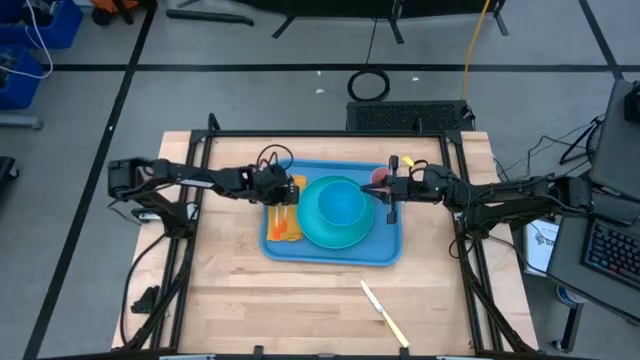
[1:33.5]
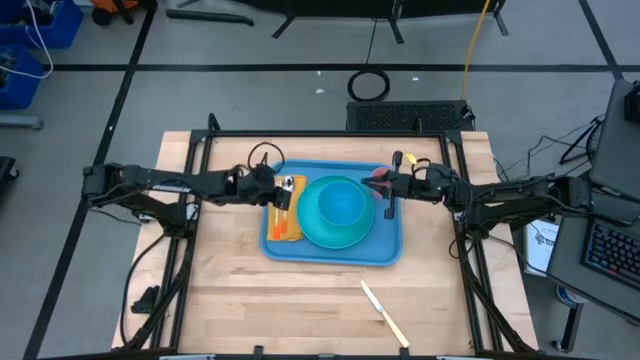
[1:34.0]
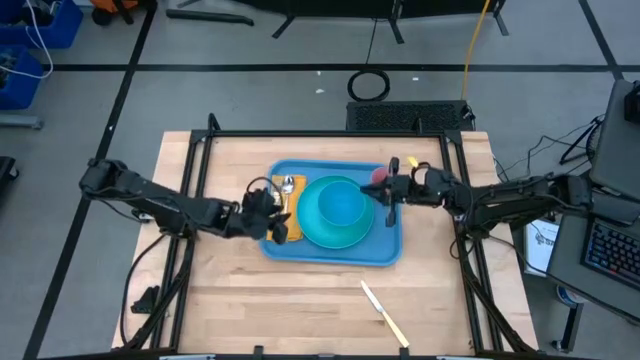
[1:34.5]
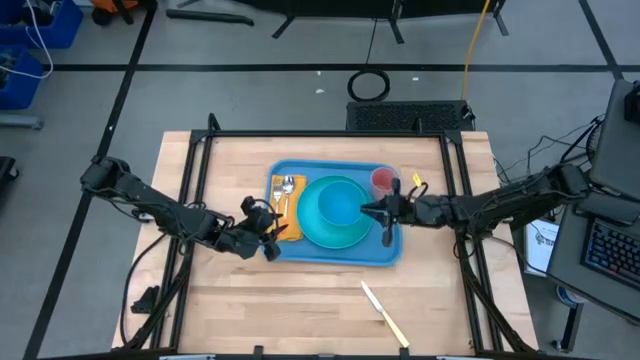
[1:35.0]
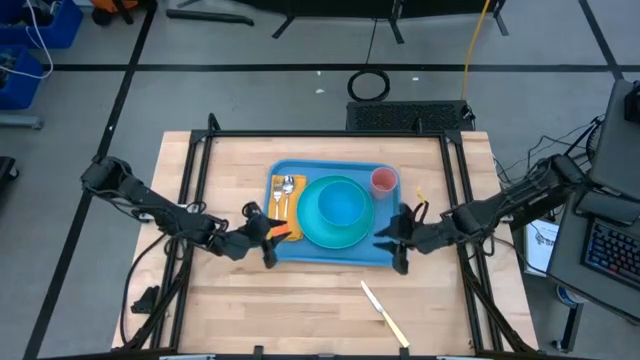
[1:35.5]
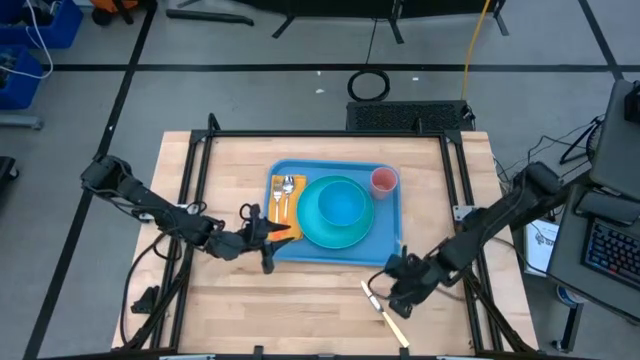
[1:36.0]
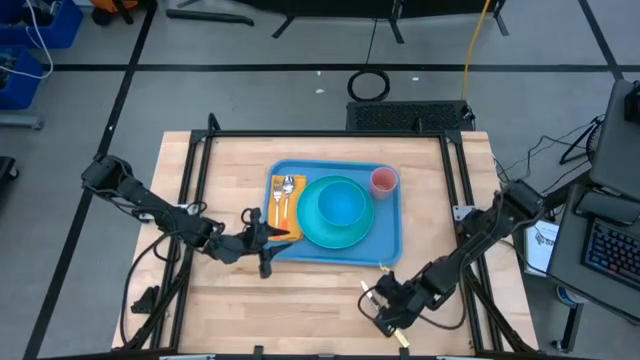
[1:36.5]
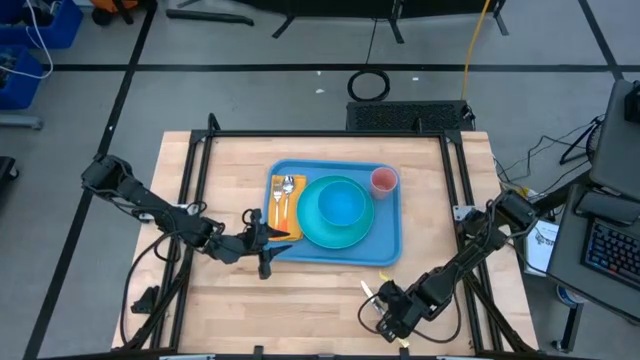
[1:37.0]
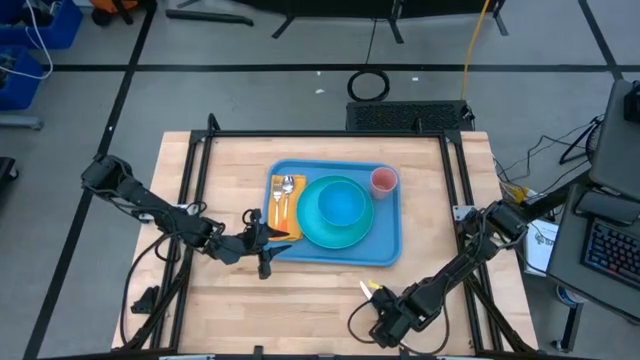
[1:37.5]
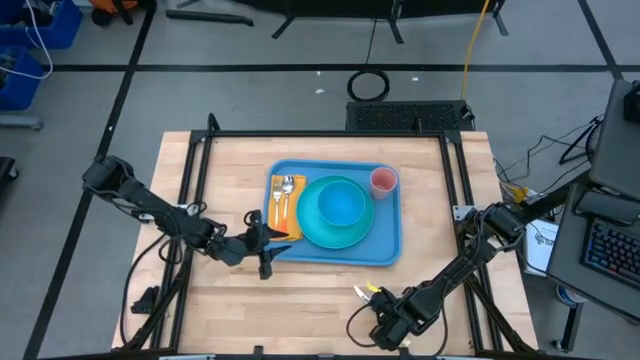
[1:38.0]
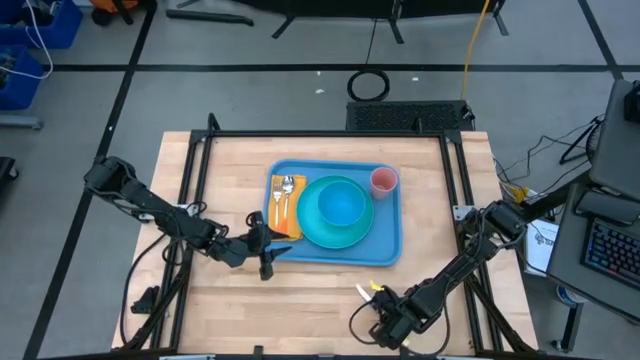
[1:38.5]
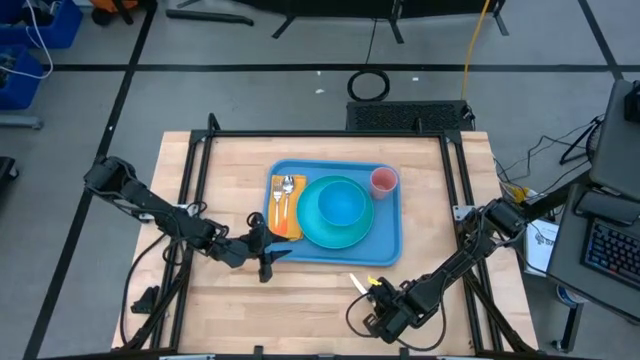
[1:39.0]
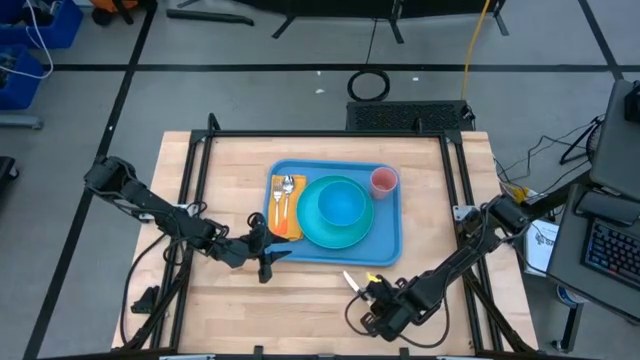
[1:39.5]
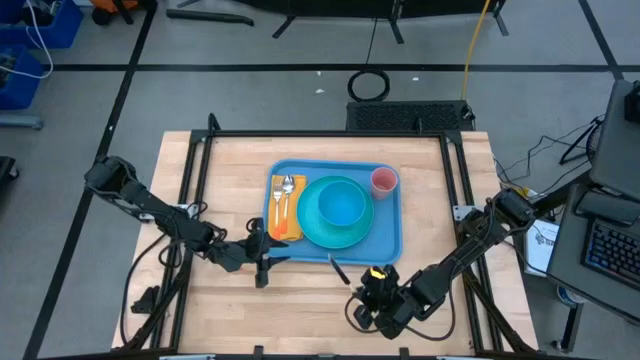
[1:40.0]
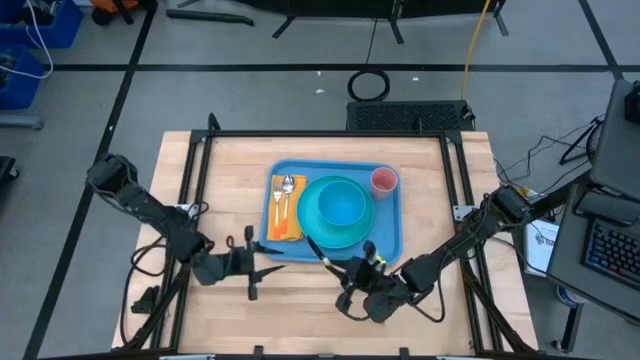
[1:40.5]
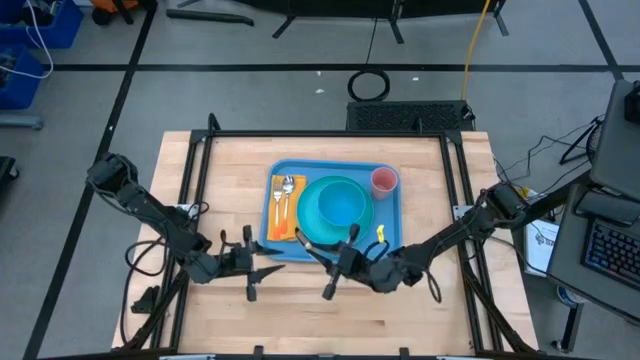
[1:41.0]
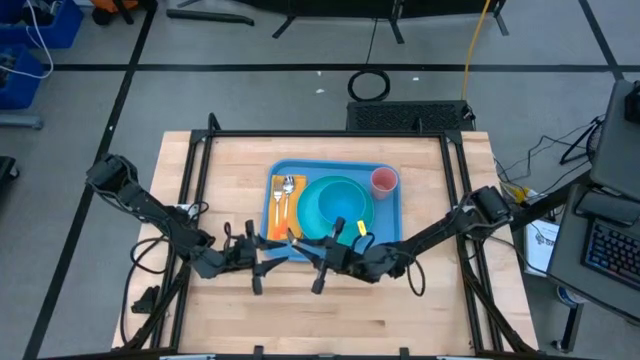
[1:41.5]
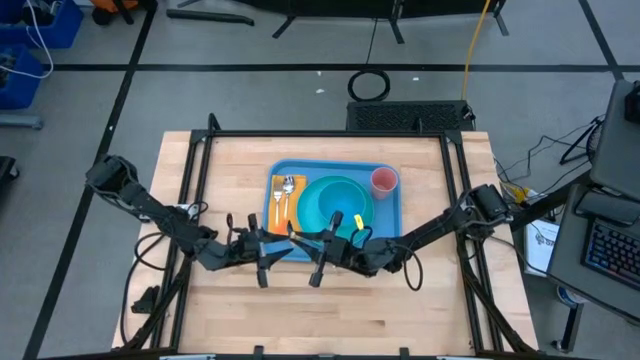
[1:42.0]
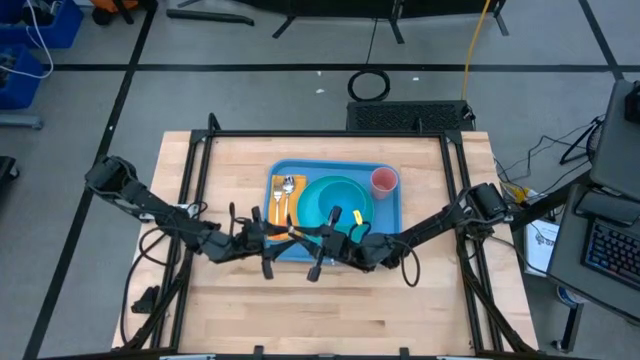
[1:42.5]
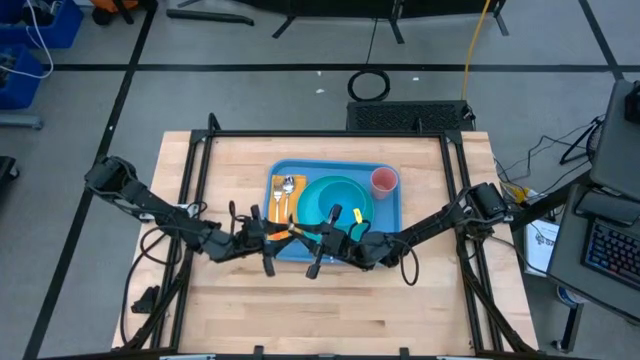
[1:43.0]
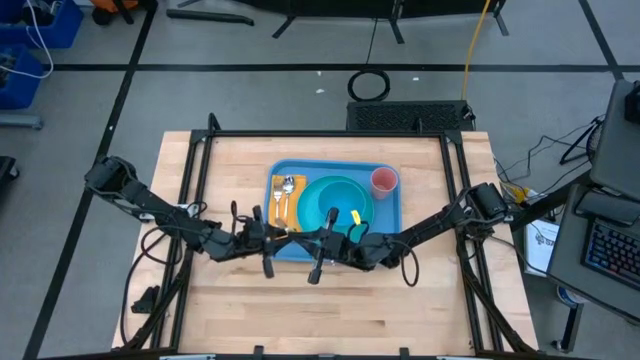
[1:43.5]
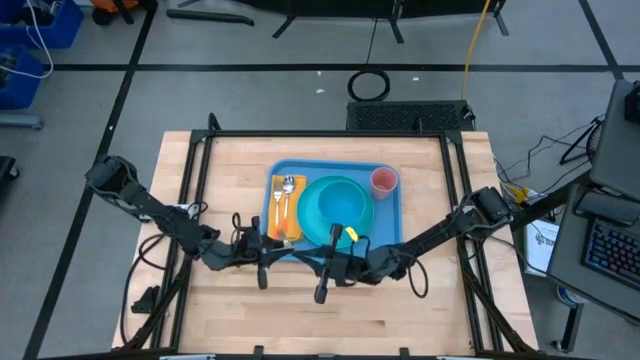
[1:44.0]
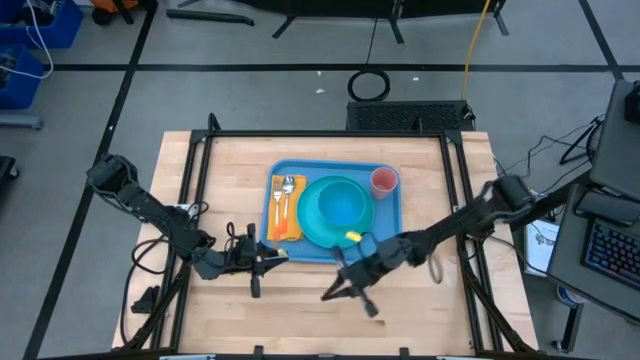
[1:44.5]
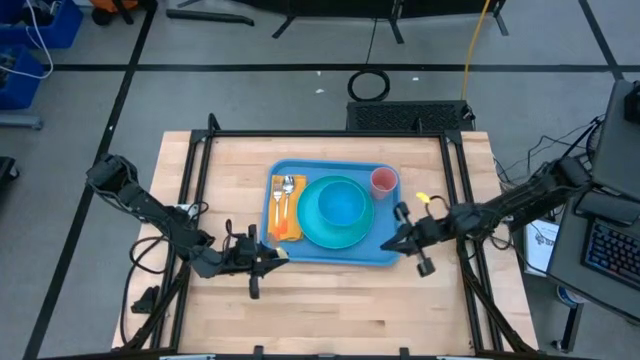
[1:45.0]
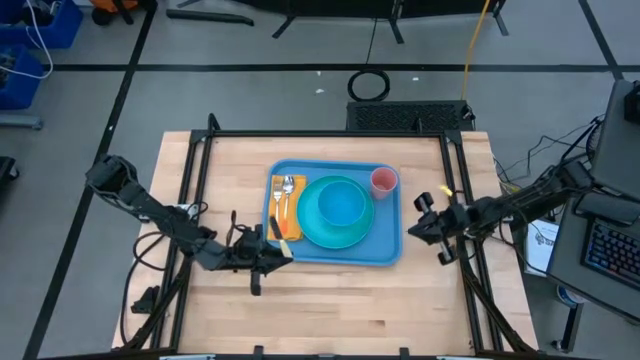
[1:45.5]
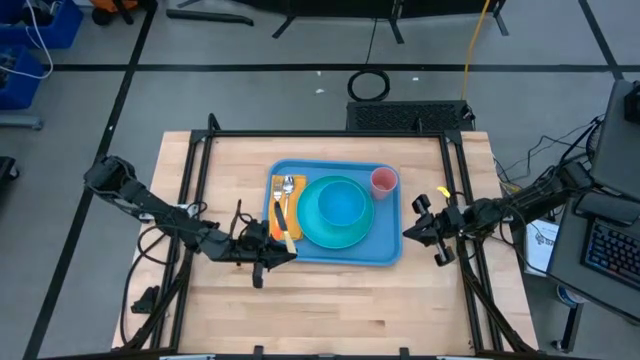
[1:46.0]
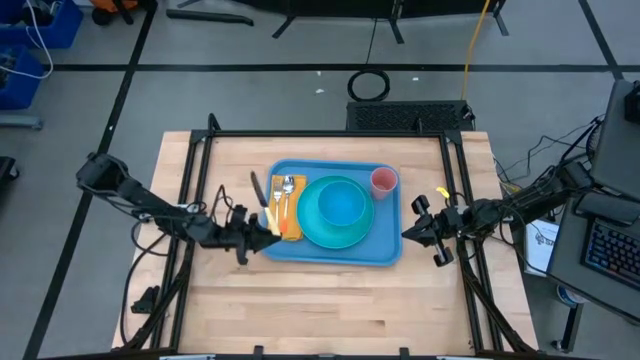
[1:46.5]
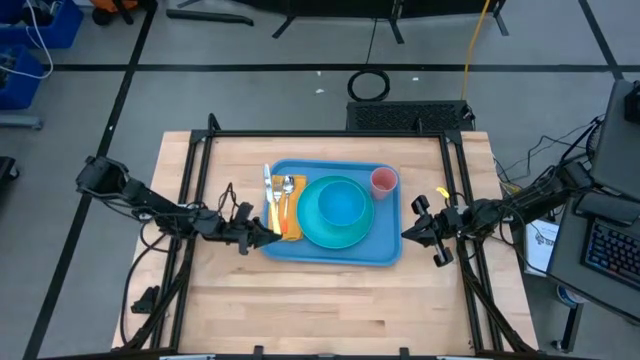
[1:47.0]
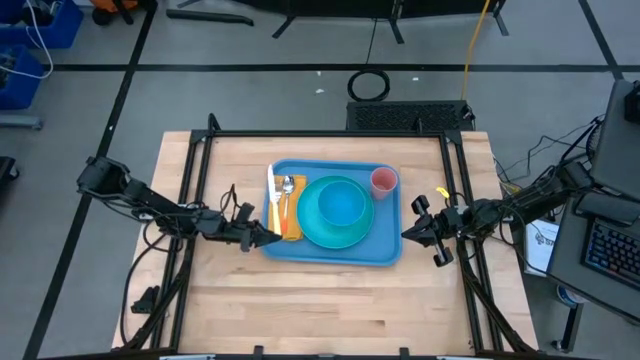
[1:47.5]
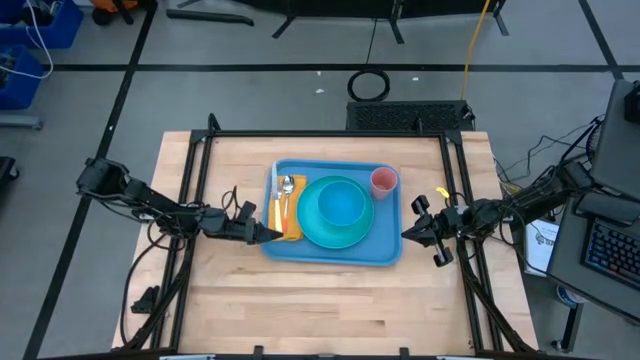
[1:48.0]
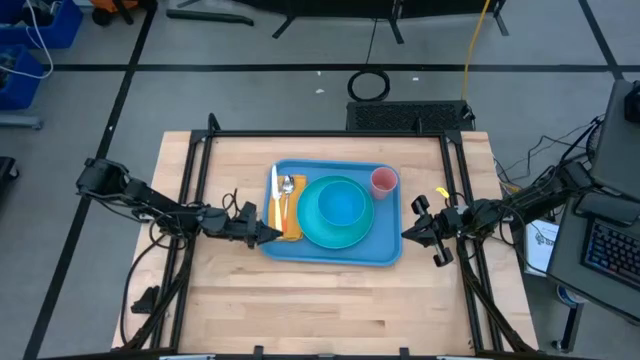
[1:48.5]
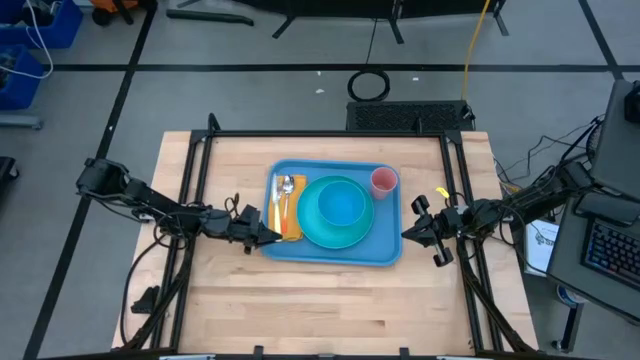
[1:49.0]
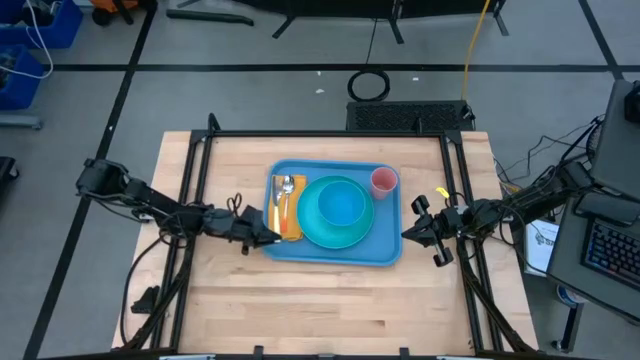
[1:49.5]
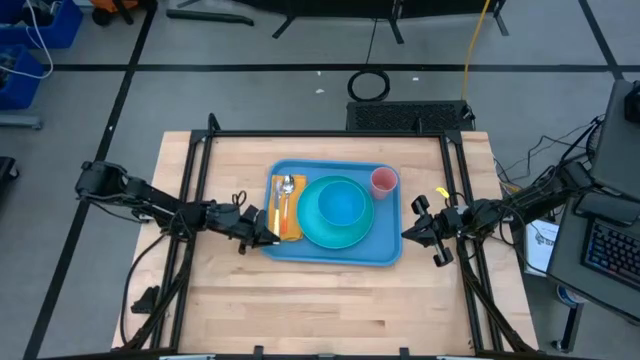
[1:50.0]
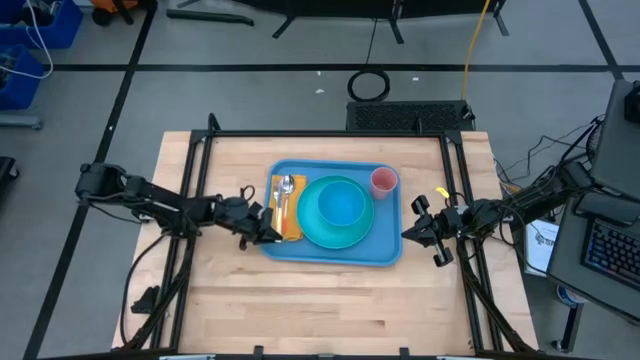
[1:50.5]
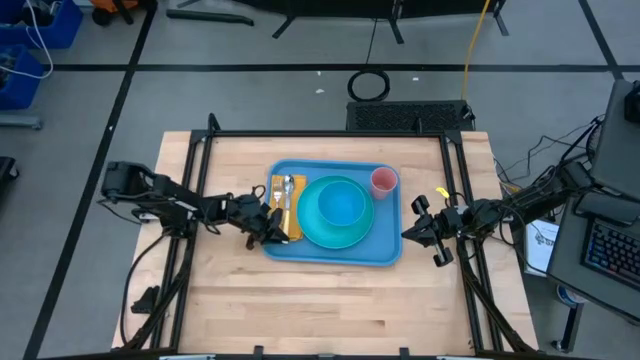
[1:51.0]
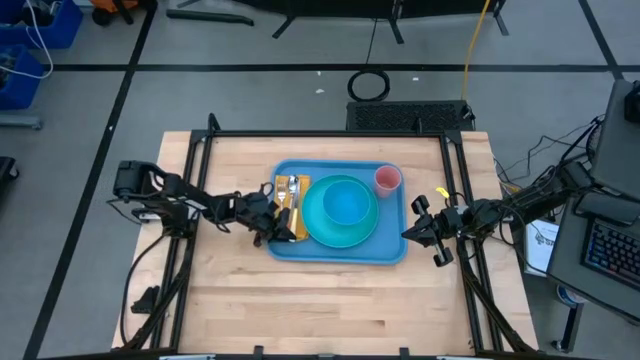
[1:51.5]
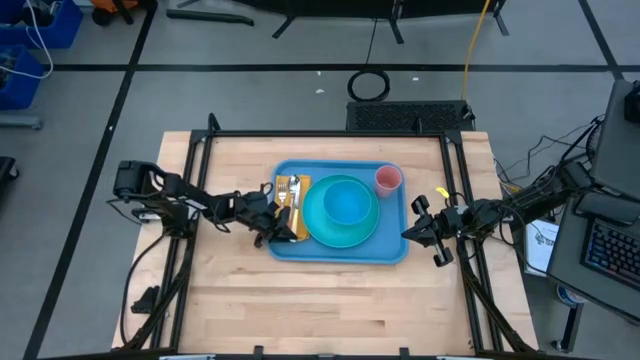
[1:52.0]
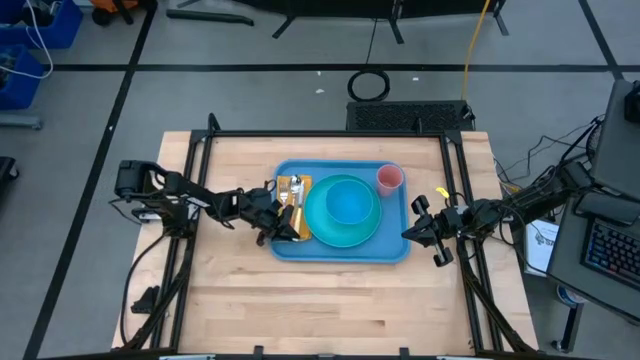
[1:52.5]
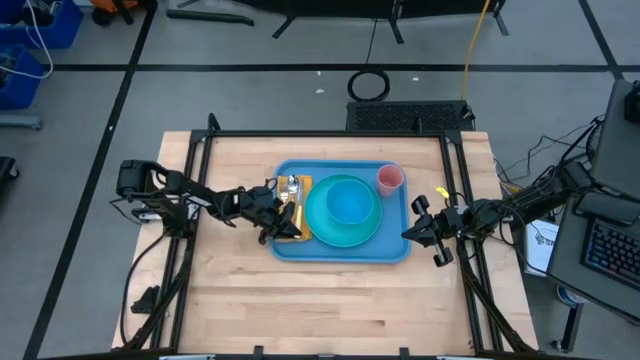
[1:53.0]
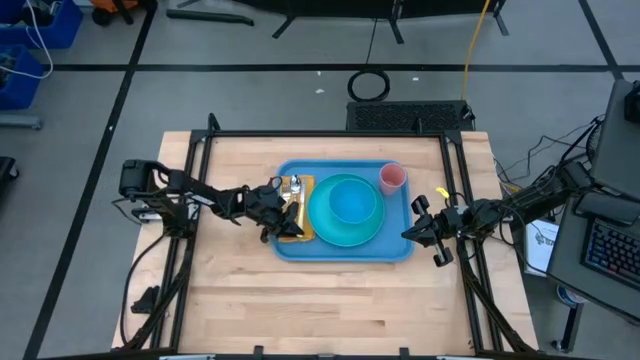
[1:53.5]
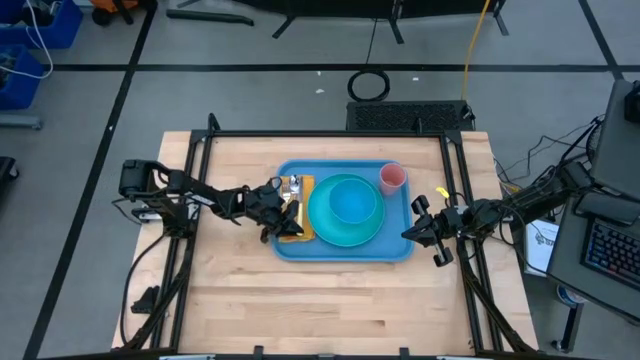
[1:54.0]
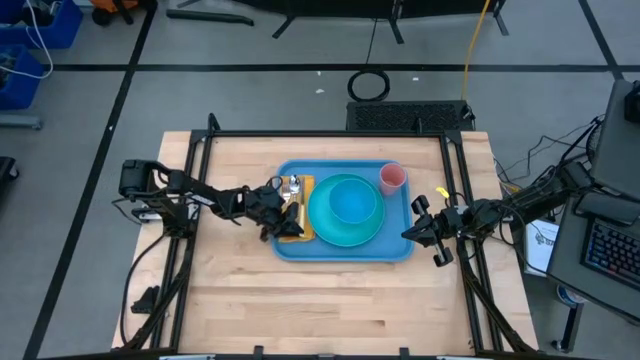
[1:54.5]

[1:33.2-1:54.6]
Task: Set up tray
Put the yellow knife to the right of the orange spoon on the yellow napkin on the blue serving tray
